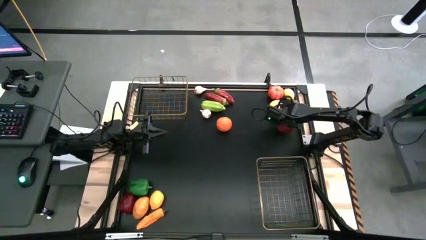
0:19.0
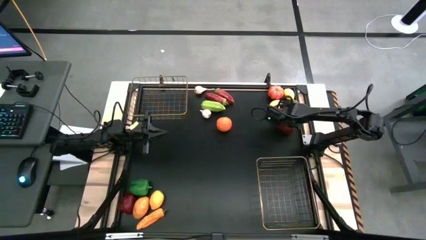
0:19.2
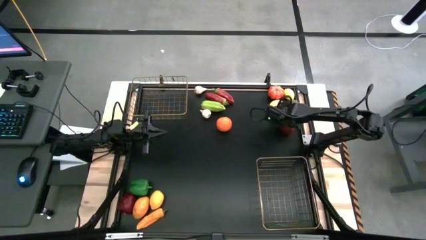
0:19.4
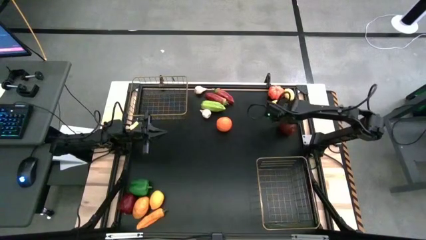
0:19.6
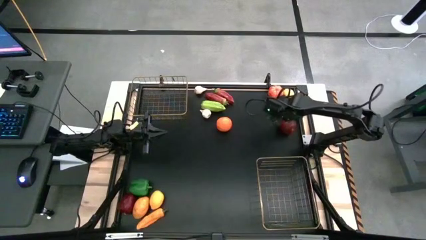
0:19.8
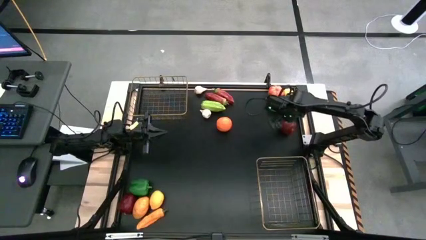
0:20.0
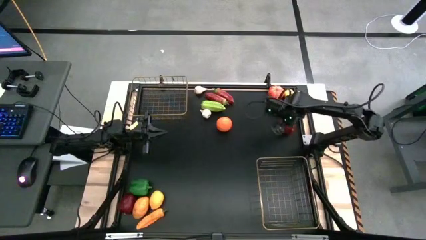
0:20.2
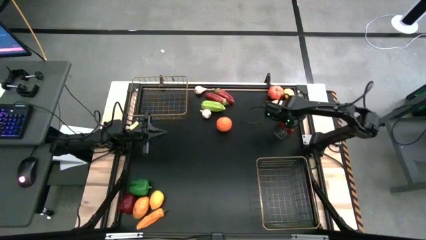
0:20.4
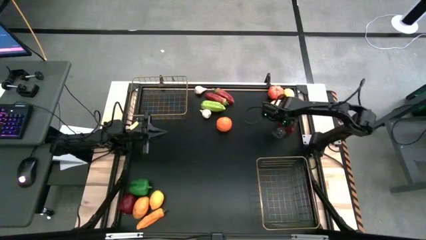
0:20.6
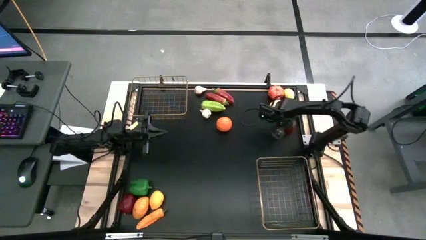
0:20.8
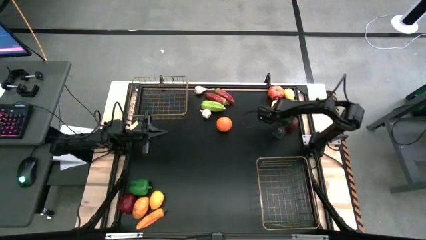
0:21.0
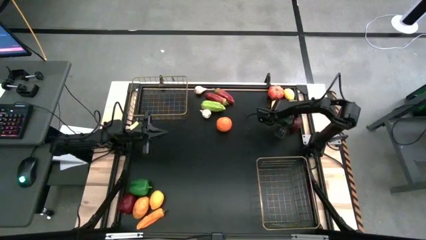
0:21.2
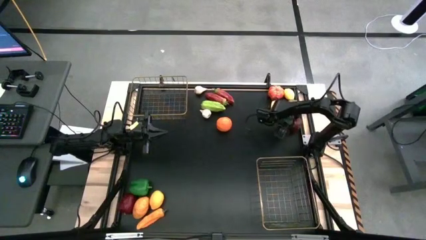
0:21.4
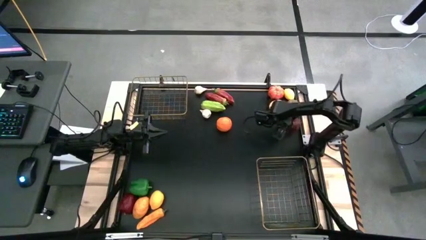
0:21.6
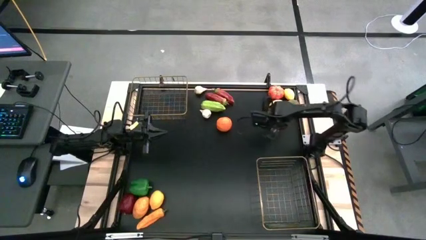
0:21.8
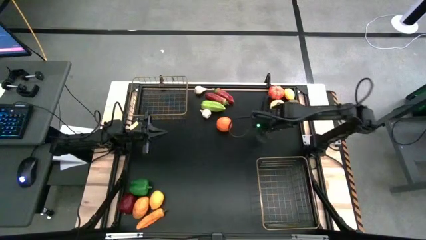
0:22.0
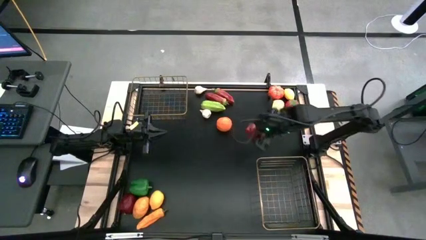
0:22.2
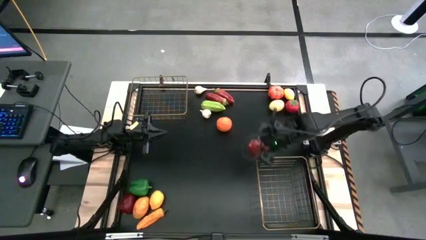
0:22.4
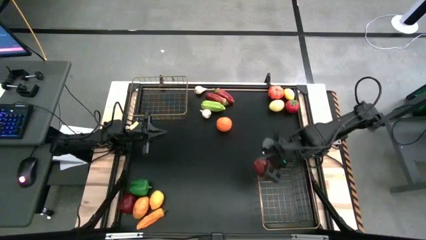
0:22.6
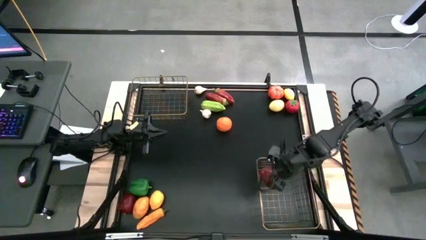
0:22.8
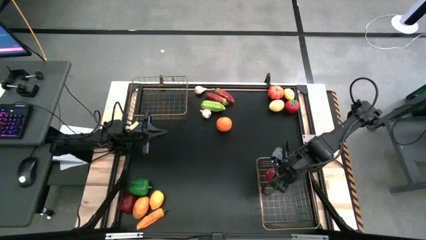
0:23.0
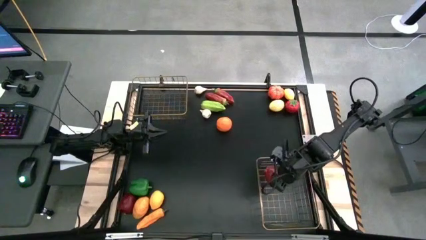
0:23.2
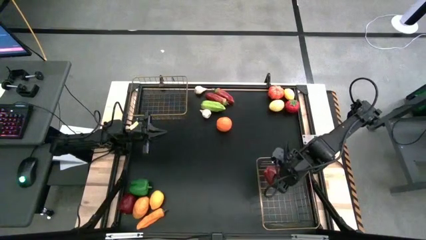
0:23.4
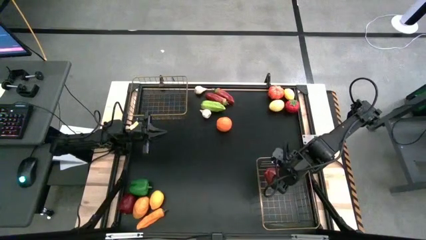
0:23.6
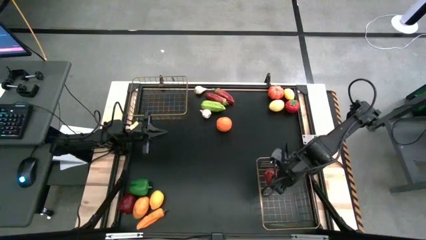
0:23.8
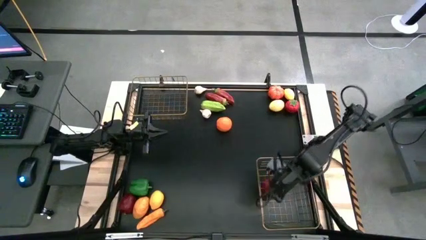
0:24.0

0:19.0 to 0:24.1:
Task: Sort produce into baskets
Put the top red apple into the bottom wire basket

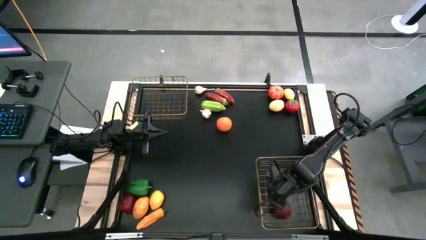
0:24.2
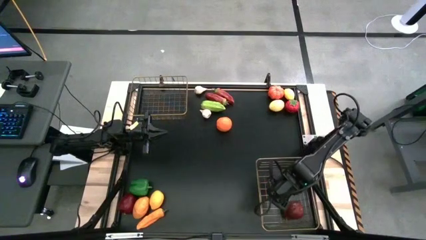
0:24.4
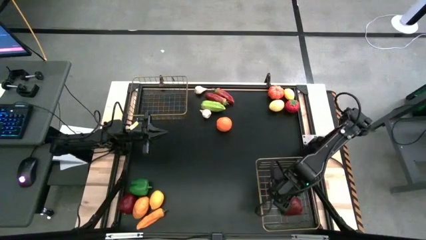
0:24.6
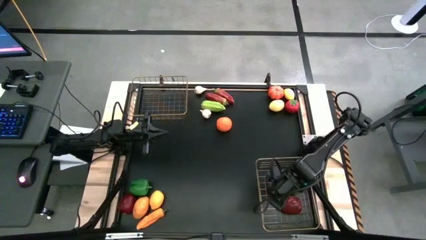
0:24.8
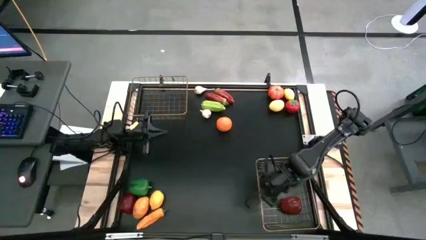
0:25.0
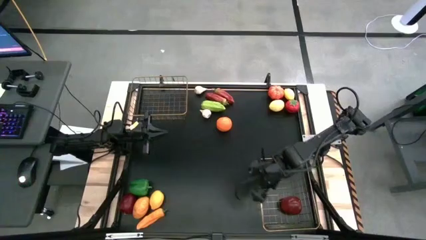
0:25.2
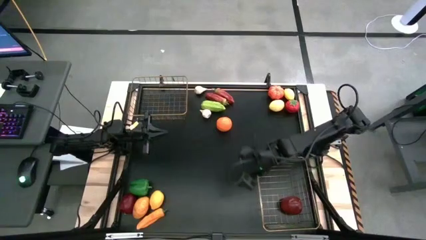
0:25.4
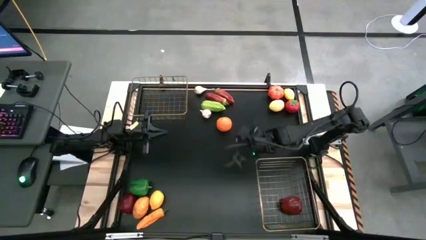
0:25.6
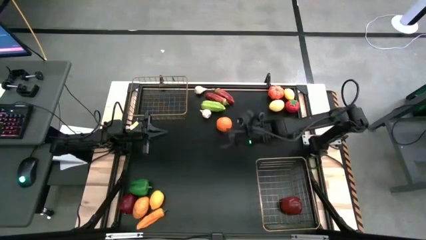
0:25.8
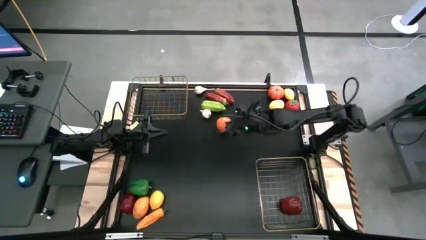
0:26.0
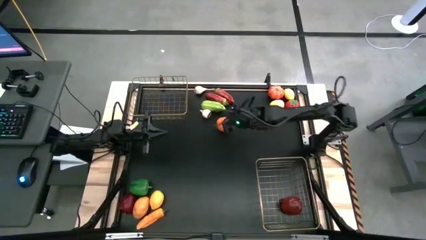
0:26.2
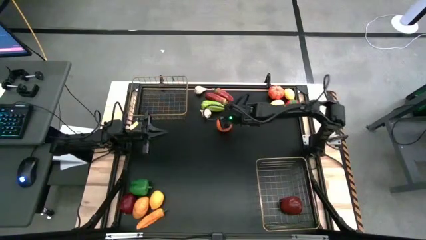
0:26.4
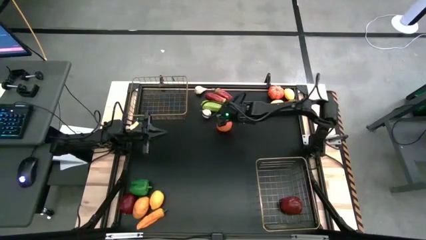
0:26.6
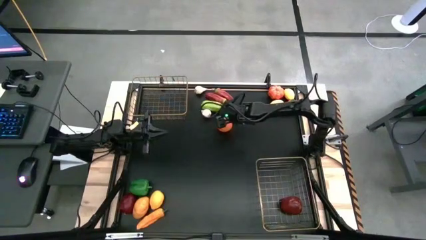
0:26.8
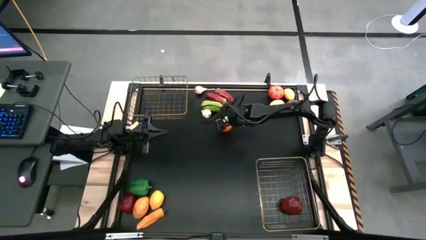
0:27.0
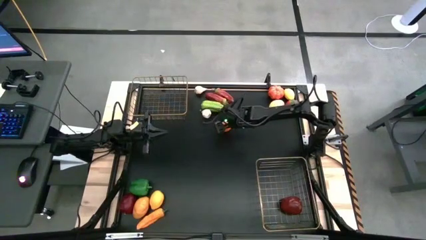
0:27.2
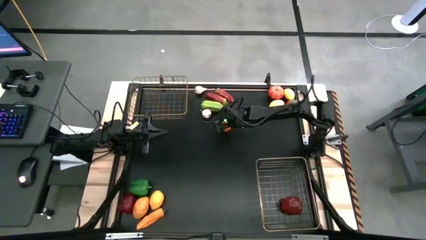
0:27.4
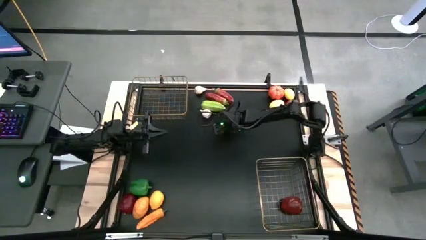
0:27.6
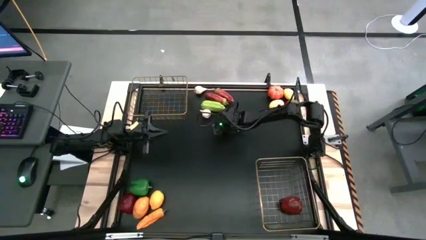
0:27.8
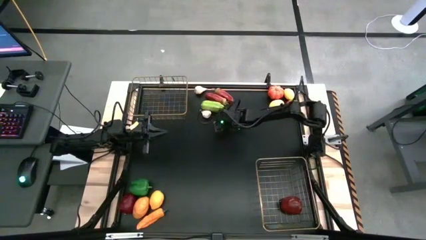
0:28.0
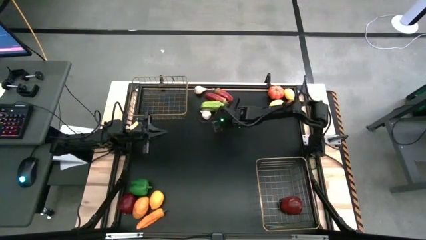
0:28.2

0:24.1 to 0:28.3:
Put the orange into the bottom wire basket

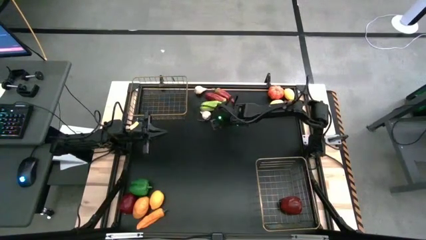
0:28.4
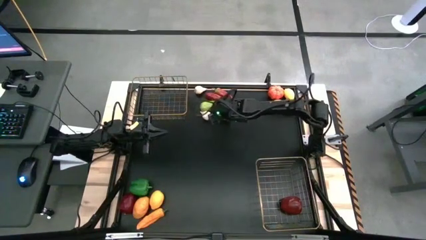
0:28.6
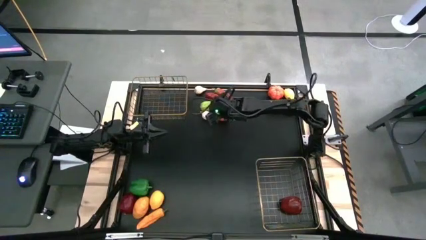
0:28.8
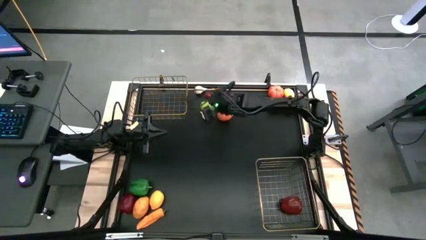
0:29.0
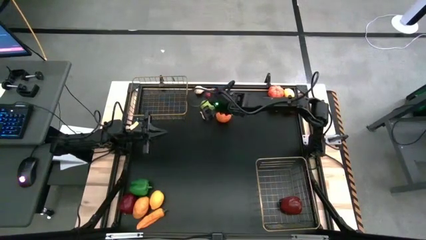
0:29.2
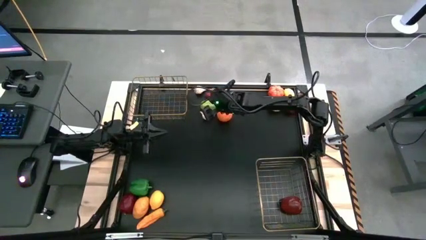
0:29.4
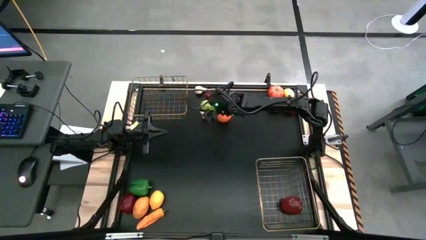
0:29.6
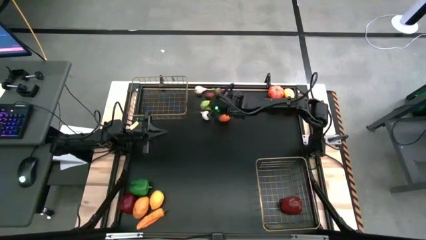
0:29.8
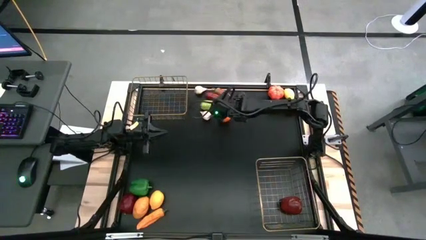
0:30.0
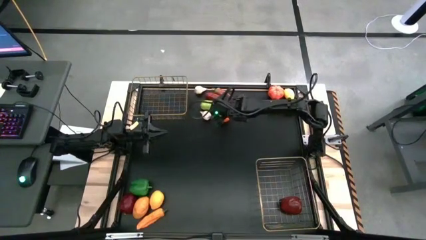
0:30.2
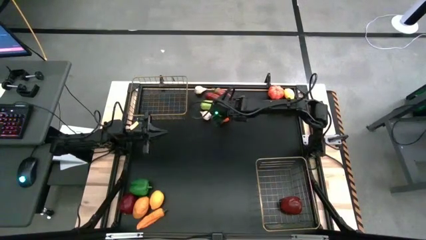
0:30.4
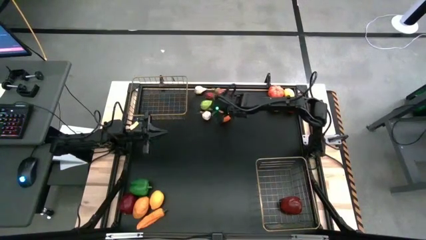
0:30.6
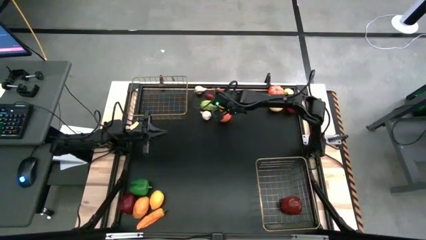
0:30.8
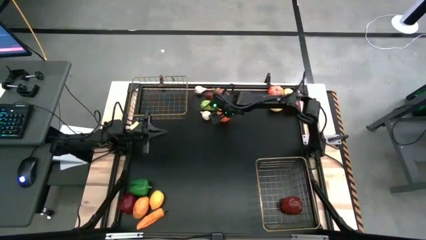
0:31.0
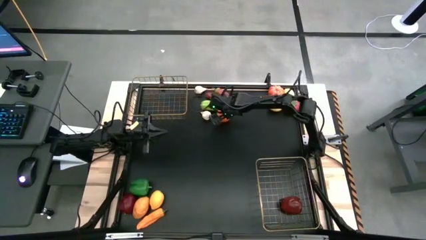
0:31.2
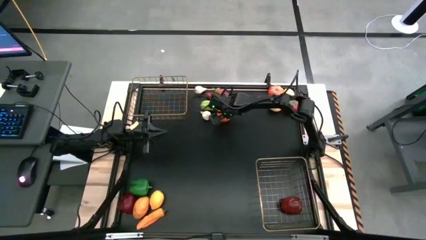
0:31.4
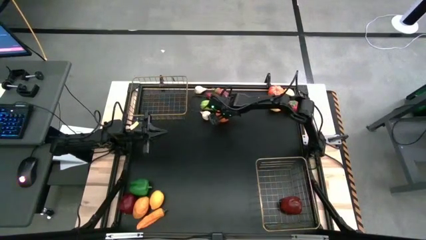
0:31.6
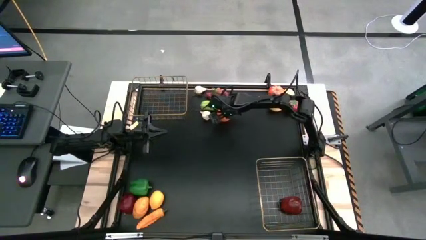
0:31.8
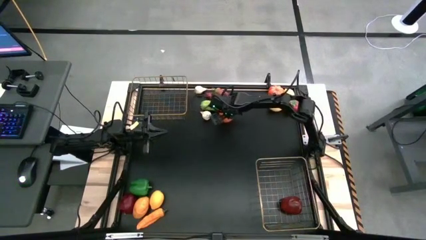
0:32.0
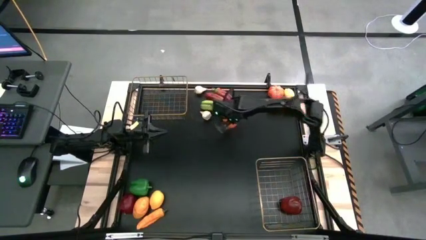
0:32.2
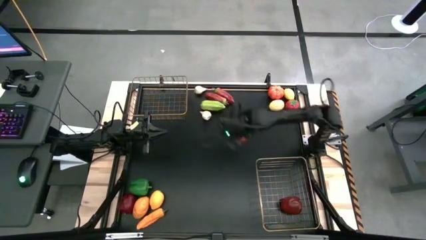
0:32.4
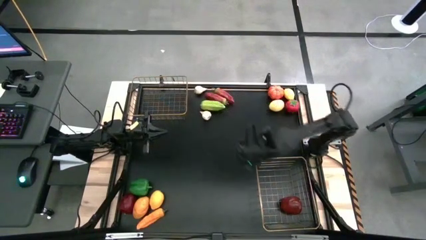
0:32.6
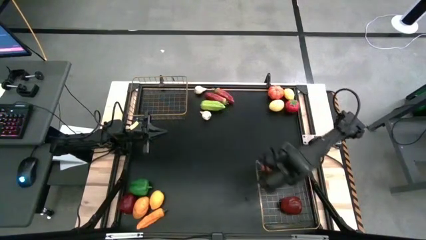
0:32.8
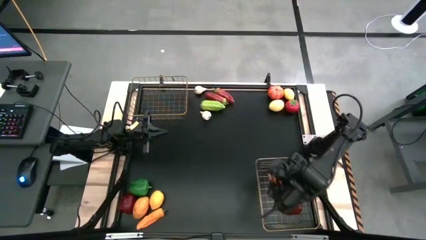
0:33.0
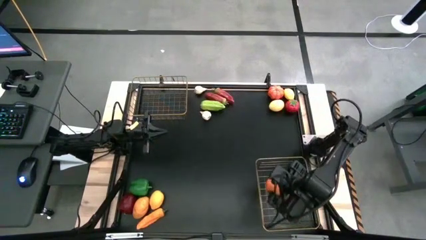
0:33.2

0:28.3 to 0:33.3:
Put the orange into the bottom wire basket

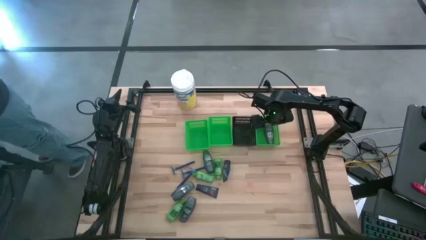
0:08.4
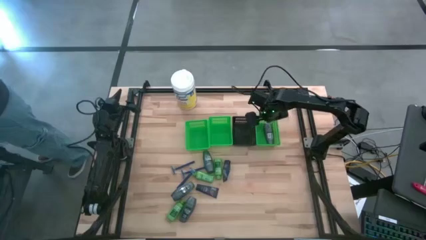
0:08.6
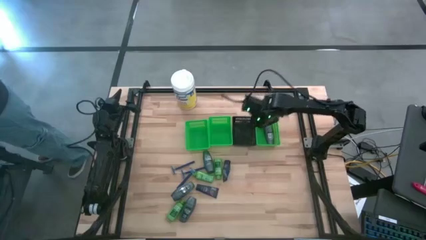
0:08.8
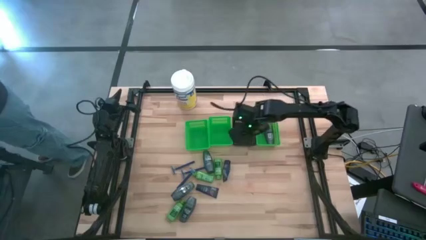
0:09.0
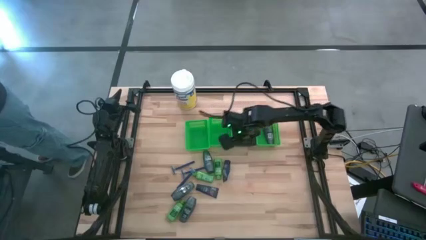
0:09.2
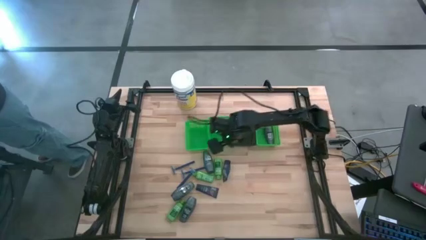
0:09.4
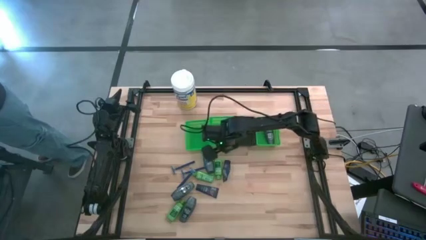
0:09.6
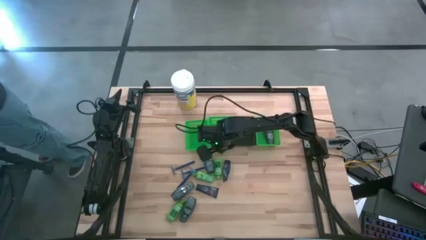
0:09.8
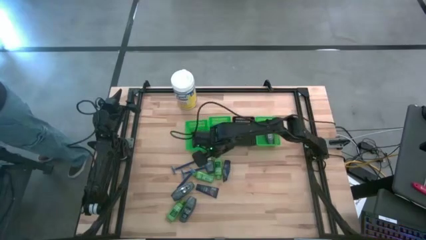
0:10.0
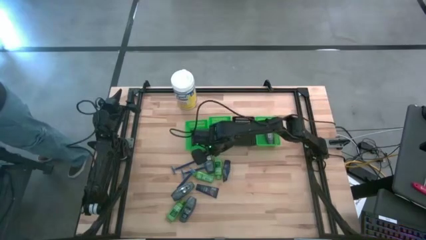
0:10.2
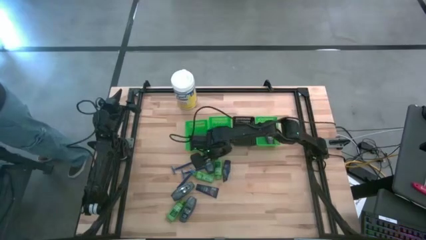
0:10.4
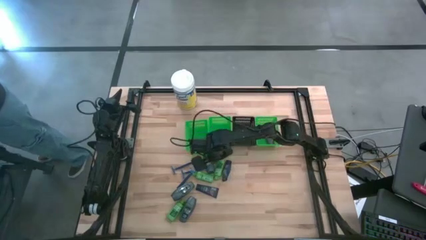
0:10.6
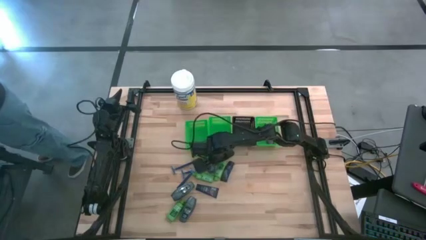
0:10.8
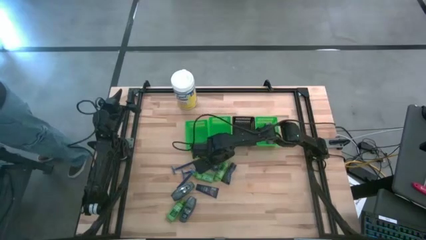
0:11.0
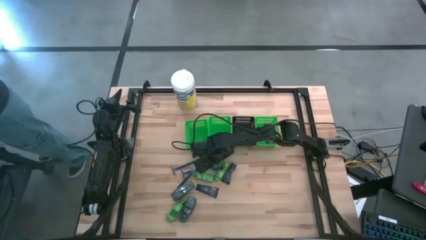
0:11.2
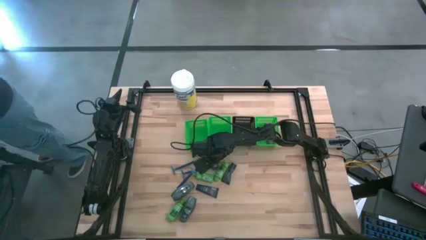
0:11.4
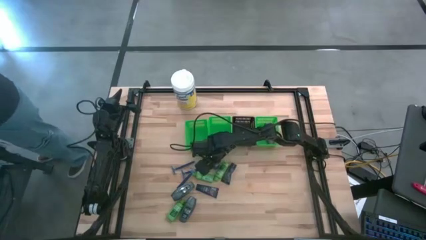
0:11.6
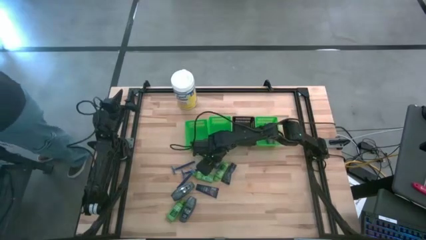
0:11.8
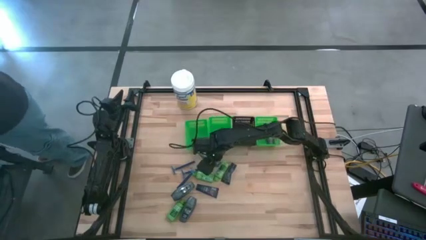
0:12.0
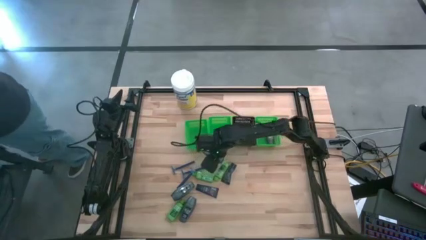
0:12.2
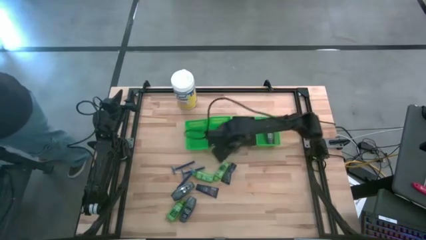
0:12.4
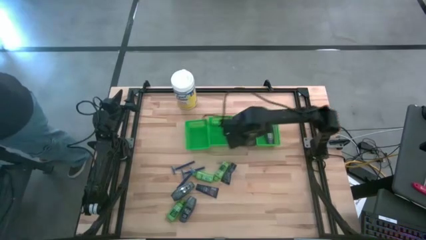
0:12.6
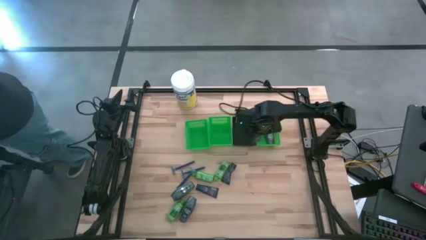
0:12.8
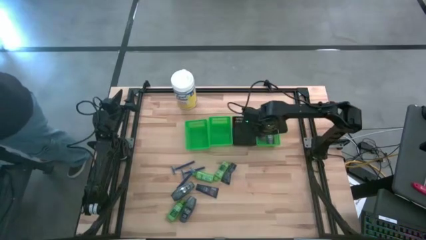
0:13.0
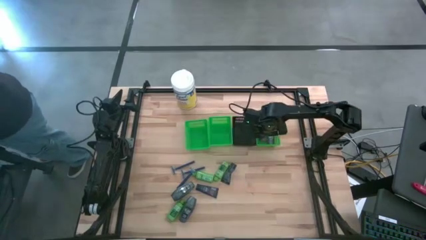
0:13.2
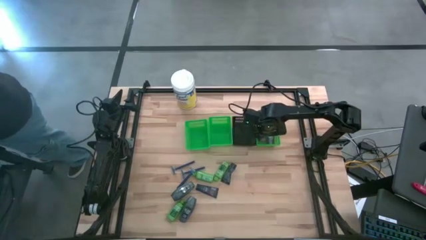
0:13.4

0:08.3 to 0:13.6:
Task: Pick & Place Travel size toiletries
Put the top deodorant into the right green bin
